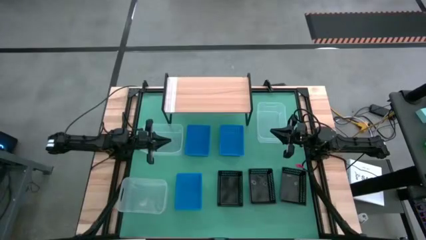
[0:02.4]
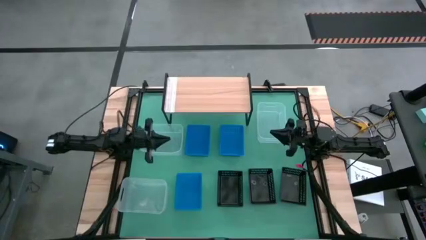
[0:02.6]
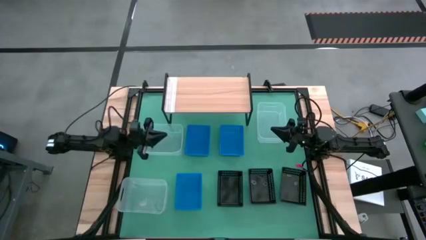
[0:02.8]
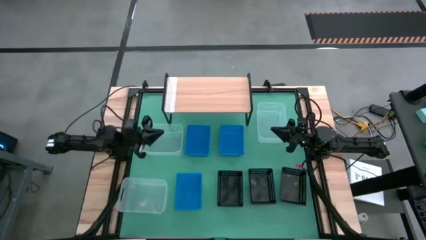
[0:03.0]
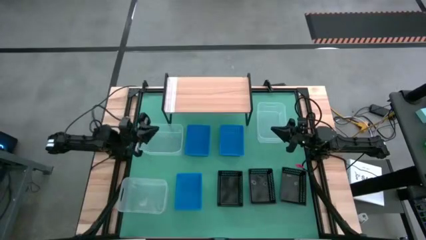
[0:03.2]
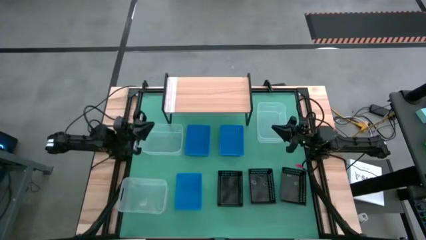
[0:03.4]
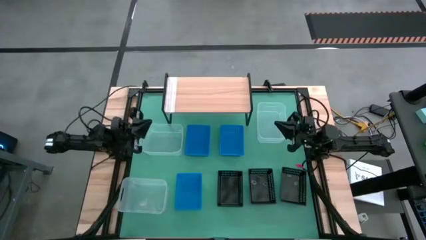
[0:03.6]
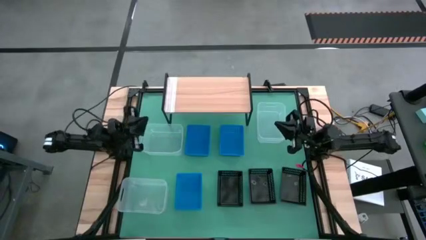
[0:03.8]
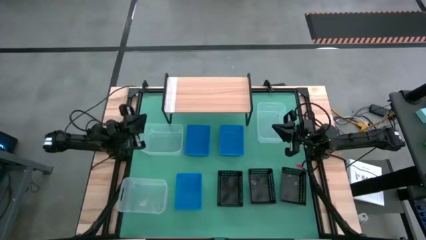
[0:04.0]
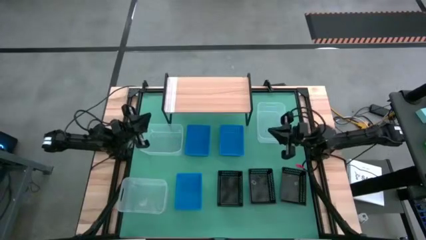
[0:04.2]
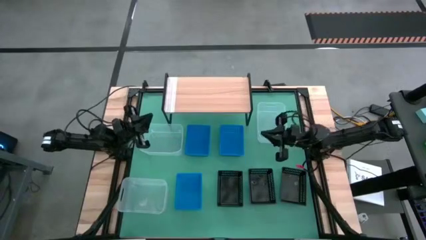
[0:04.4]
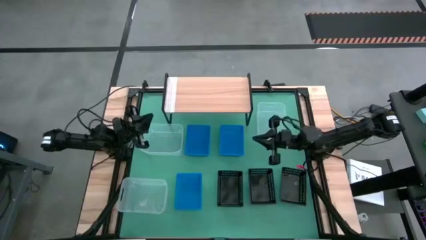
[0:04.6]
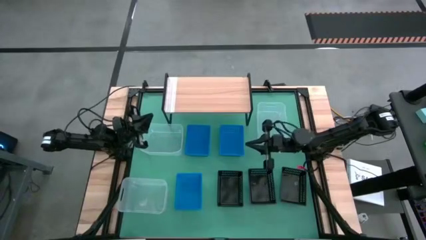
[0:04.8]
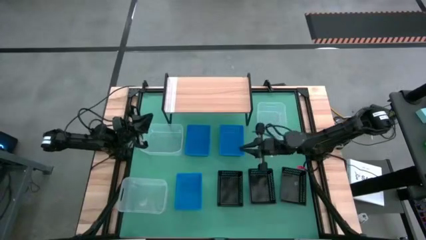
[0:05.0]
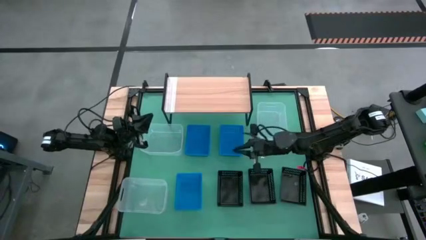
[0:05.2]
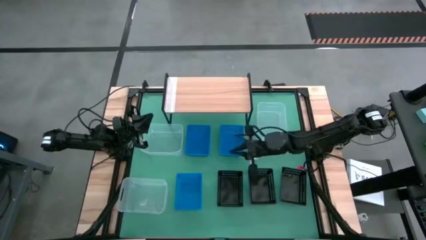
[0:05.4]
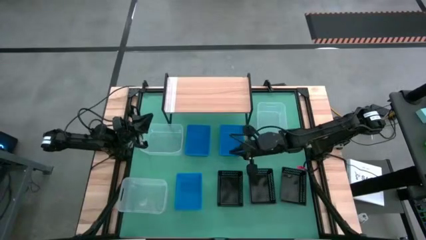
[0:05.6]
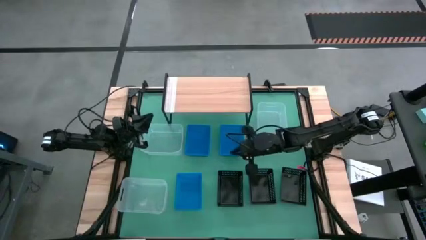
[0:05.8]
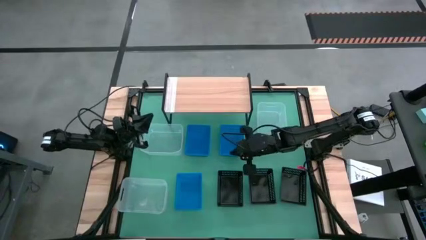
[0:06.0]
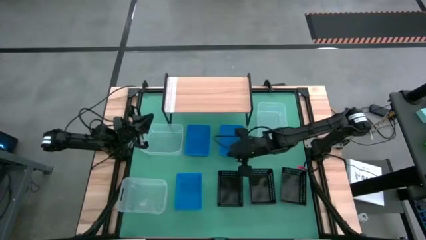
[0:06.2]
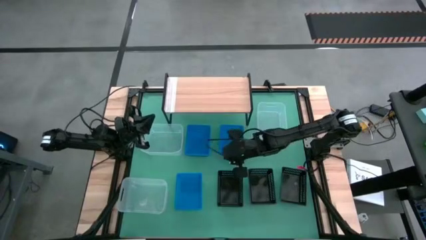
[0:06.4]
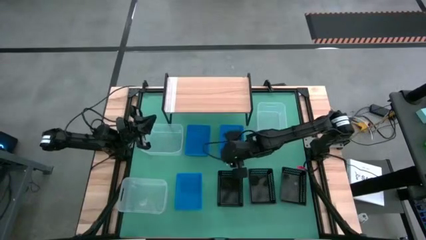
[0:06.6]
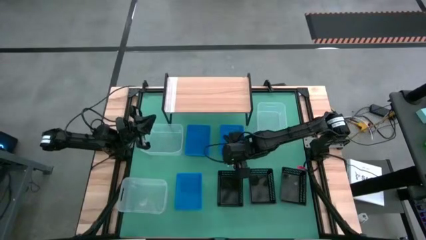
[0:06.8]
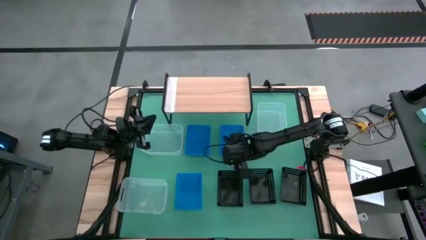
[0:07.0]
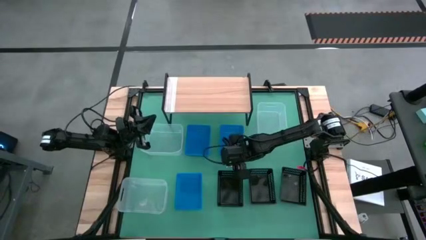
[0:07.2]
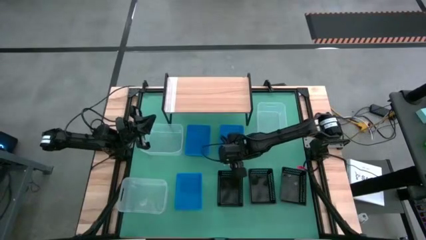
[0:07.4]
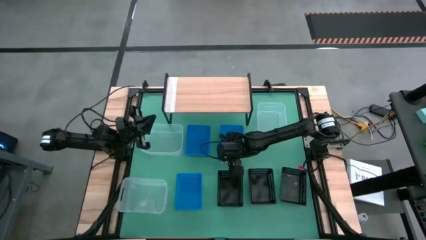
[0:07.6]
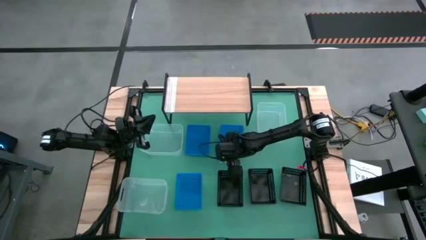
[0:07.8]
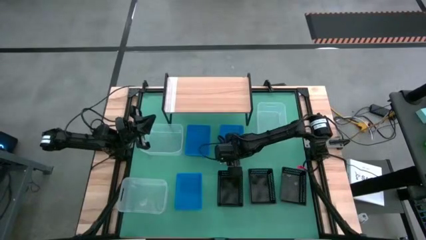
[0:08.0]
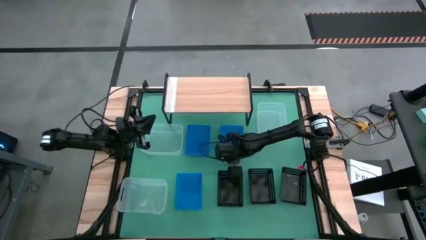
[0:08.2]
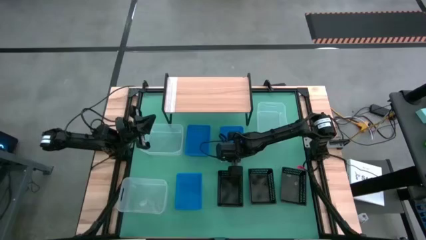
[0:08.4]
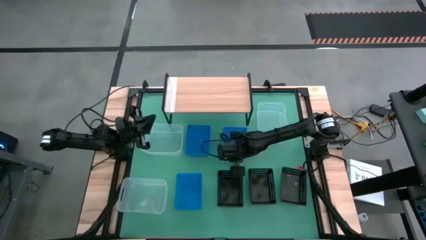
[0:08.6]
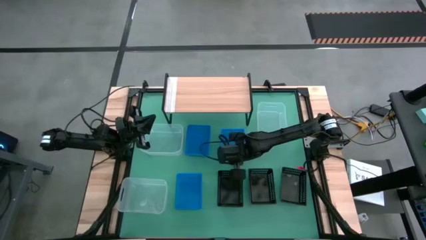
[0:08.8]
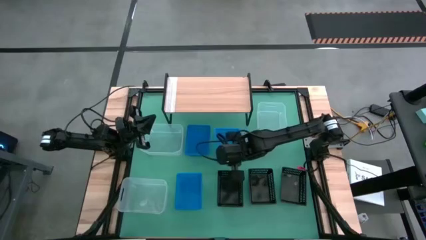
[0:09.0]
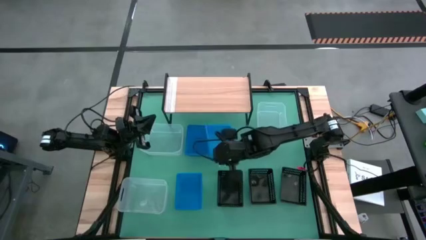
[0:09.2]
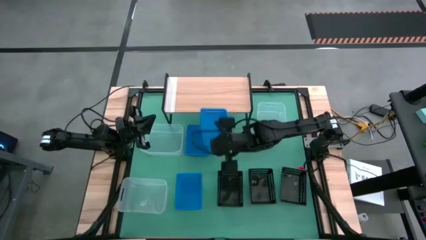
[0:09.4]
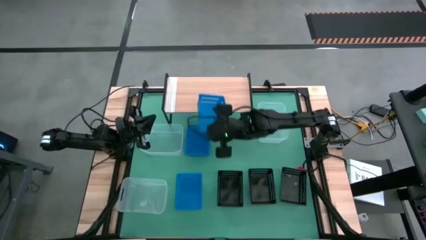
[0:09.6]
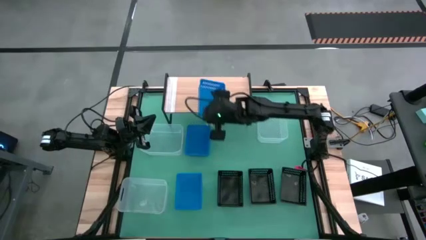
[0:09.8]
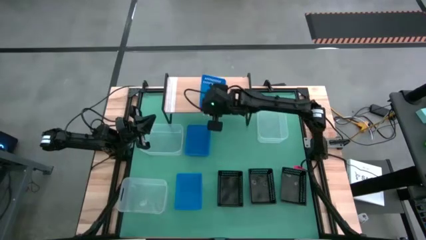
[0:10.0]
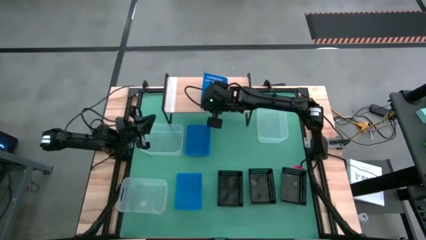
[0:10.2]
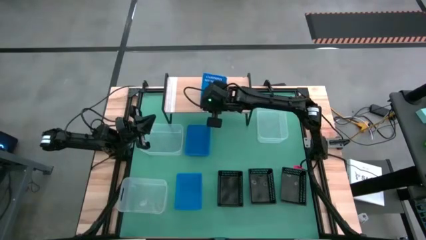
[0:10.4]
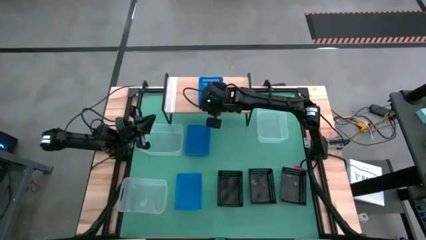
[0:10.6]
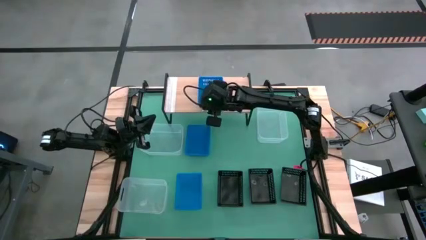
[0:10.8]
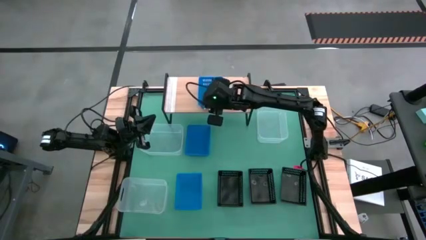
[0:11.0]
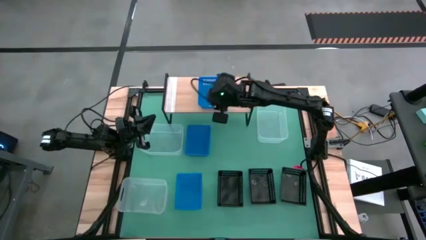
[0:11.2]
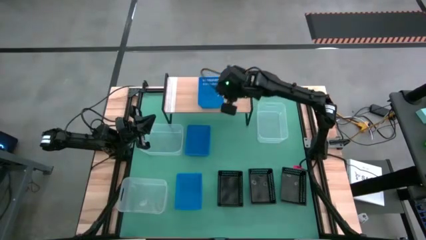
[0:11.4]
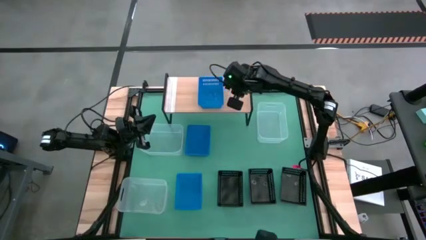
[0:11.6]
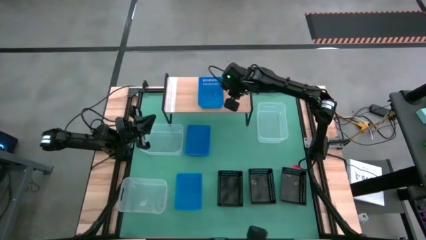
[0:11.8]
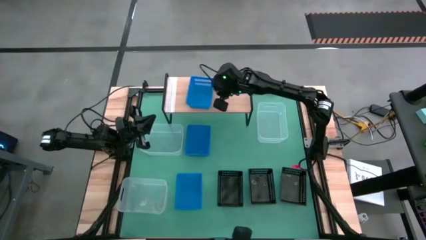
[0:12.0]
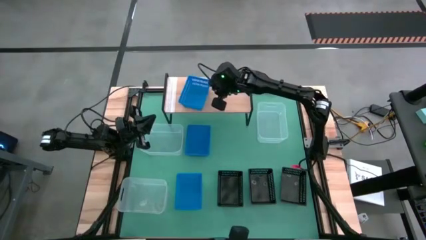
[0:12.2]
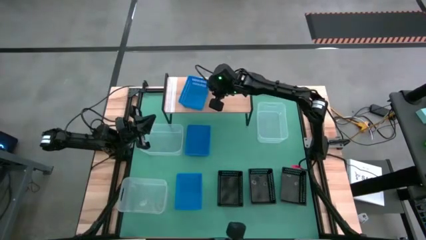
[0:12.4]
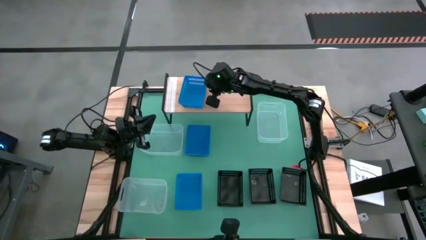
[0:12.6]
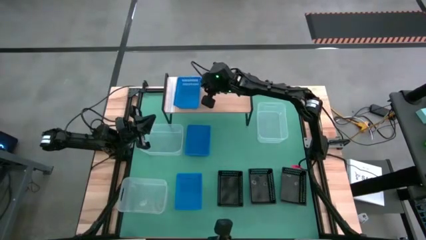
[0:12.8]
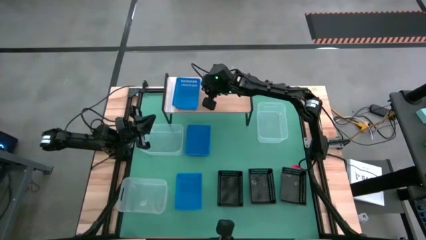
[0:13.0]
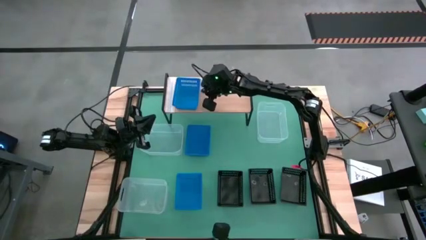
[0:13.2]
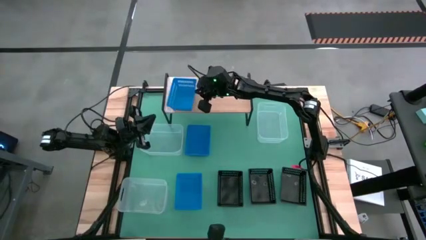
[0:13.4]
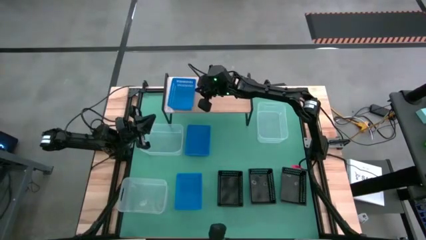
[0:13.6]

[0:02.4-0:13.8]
Task: Stack baskets on shelf by color
Put the top right blue bin on the shelf

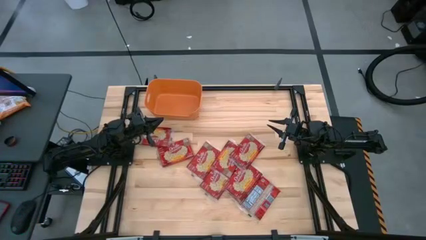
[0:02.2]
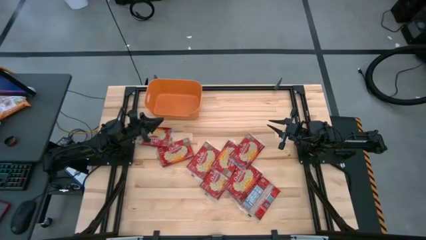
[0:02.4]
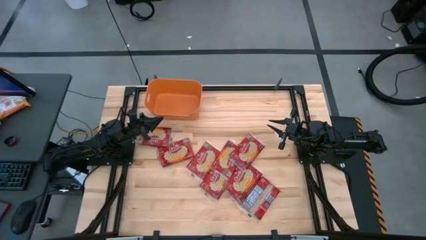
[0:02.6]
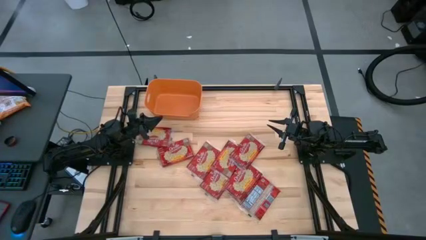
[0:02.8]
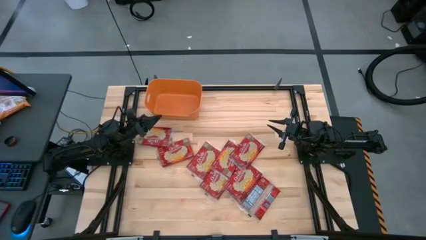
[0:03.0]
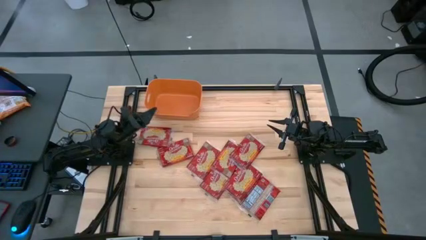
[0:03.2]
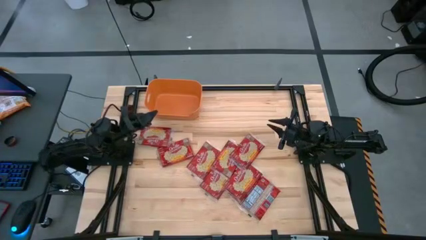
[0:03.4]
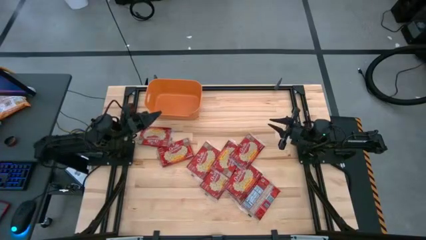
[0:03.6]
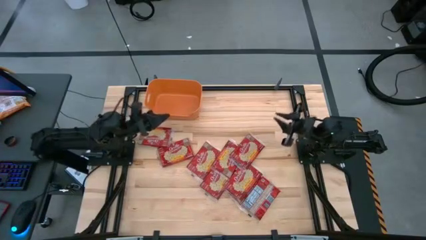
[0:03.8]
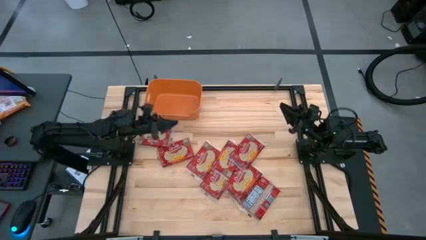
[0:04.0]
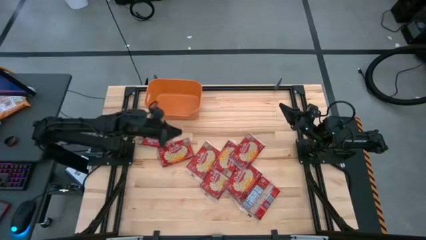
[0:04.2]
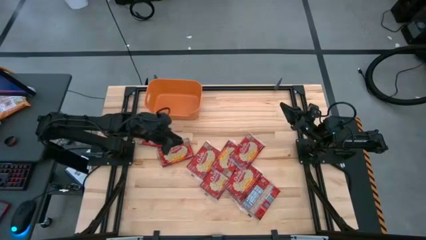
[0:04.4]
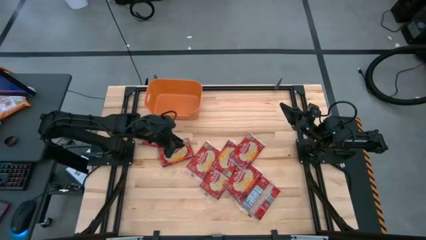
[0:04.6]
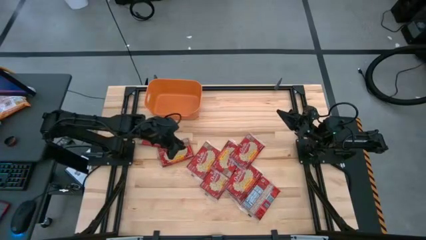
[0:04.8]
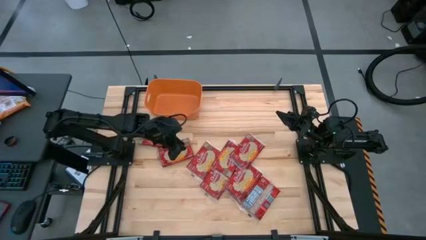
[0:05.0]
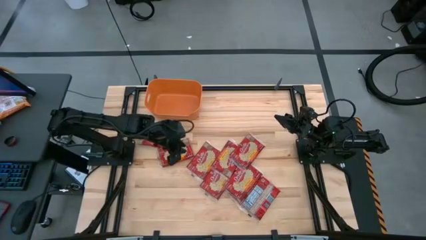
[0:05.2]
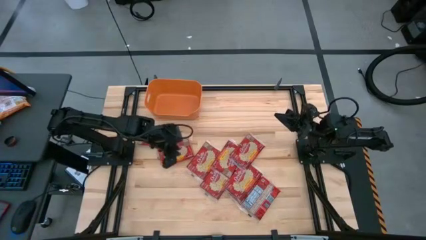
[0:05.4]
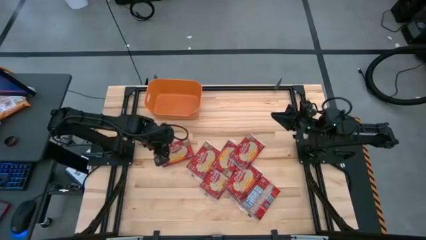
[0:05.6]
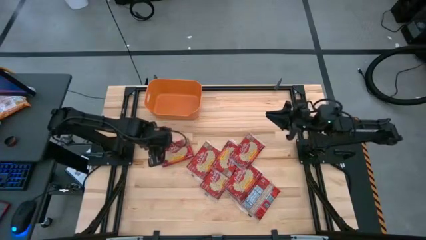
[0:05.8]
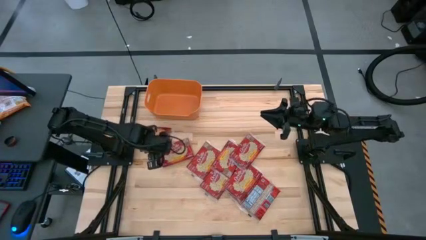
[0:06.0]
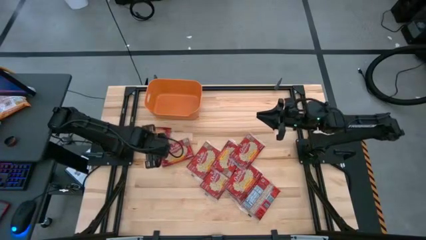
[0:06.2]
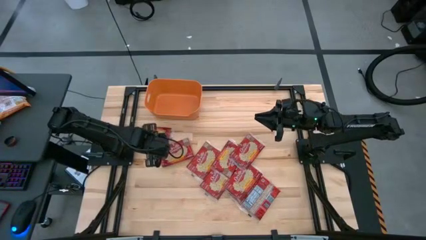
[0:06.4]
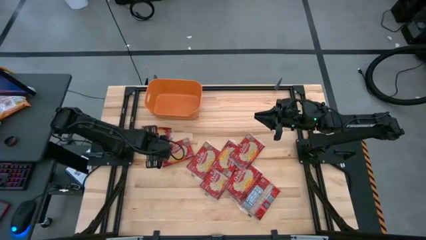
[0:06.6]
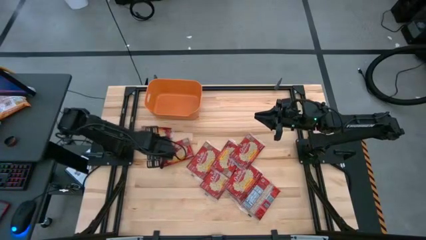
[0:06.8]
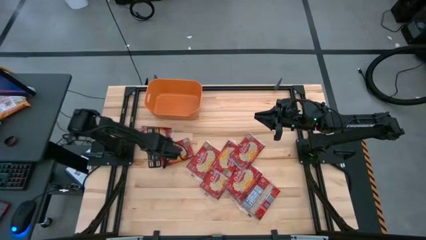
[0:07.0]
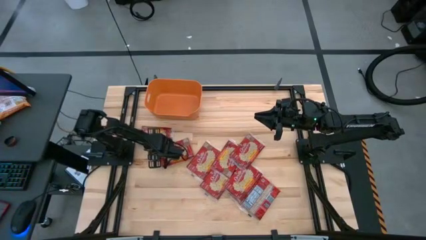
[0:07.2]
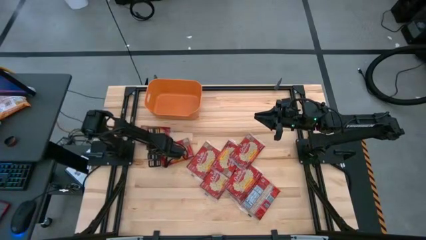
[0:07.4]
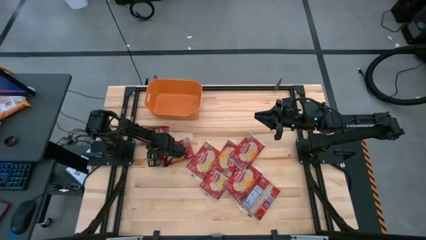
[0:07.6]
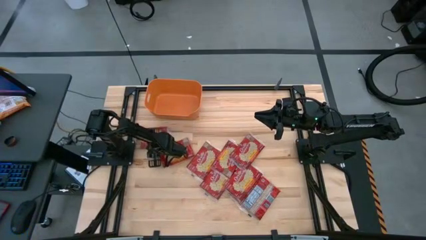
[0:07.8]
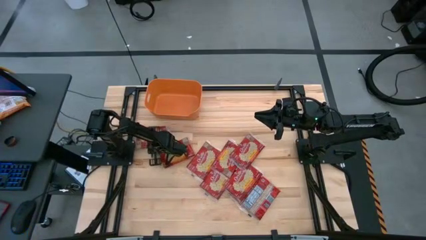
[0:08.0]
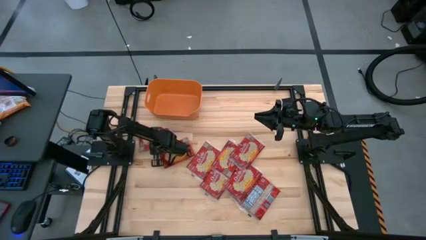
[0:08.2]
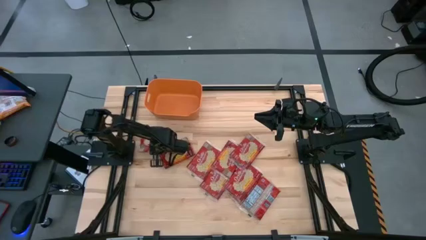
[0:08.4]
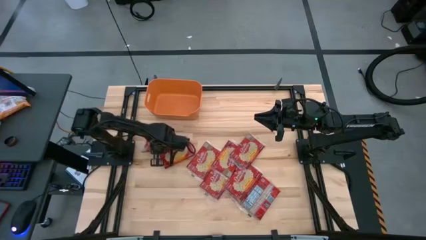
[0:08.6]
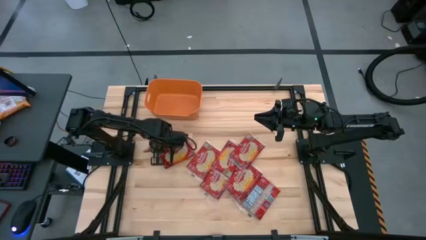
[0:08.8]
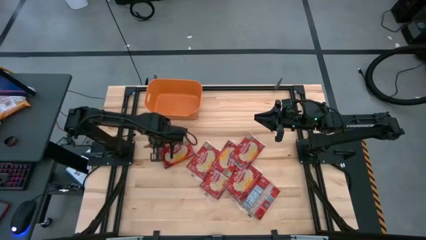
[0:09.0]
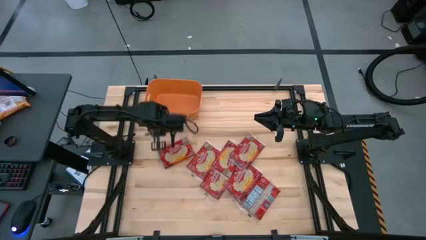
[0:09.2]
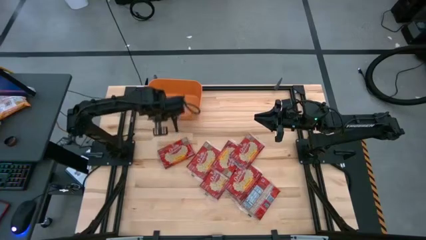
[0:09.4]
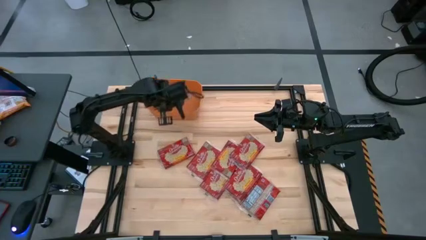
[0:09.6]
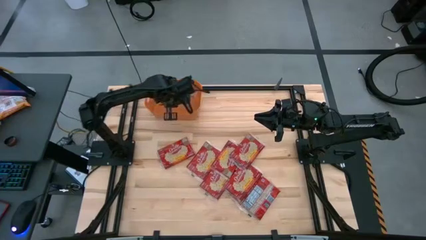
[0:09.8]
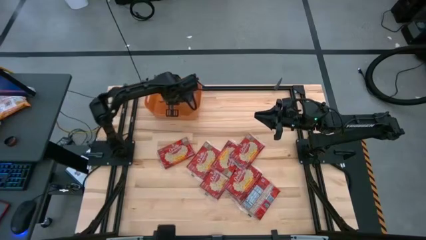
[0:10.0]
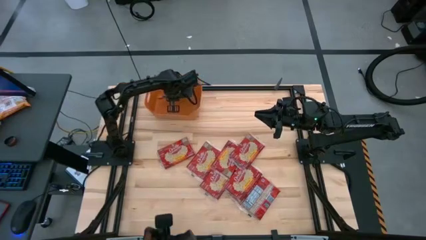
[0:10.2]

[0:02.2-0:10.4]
Task: Sort popcorn bags into baskets
Put the red popcorn bag into the orange bin
